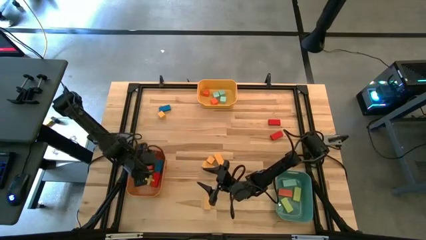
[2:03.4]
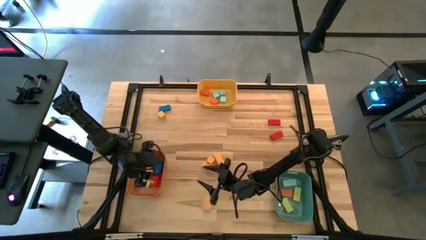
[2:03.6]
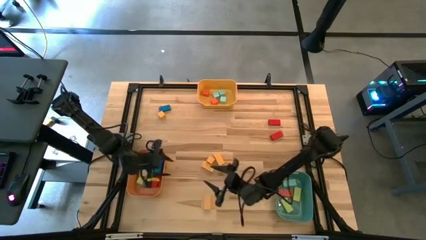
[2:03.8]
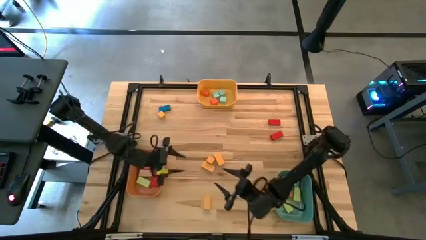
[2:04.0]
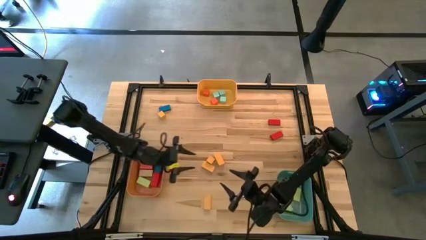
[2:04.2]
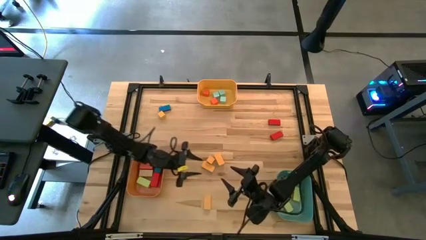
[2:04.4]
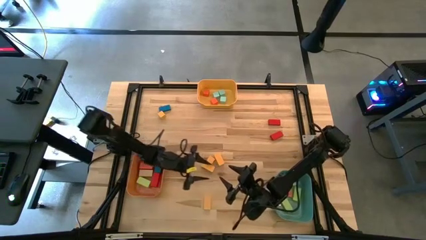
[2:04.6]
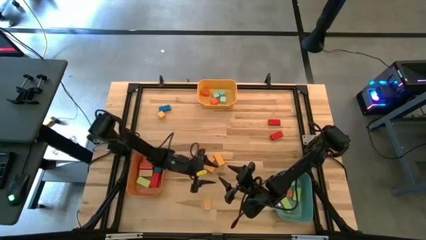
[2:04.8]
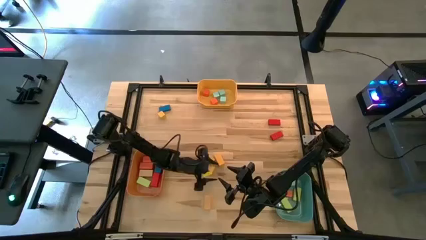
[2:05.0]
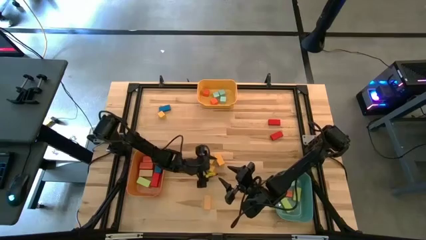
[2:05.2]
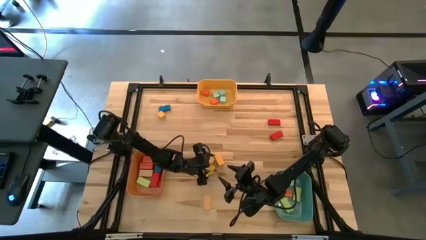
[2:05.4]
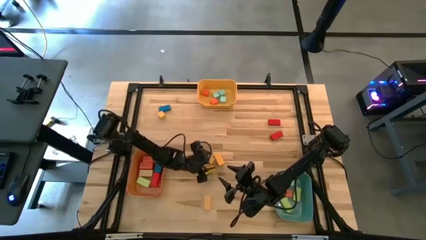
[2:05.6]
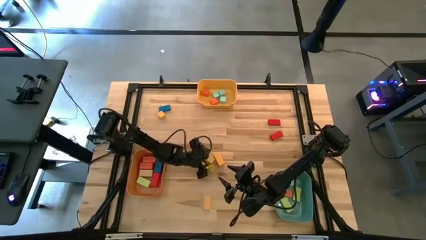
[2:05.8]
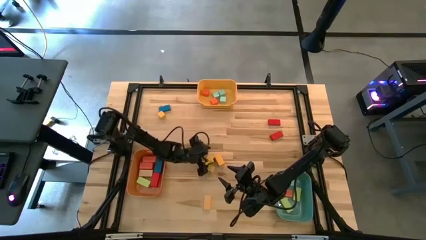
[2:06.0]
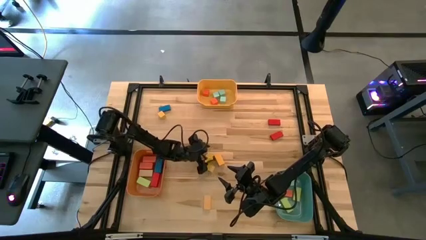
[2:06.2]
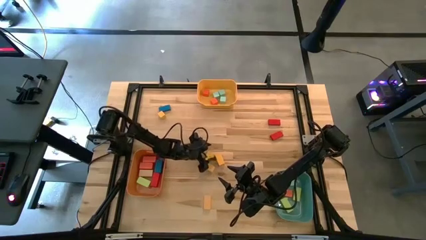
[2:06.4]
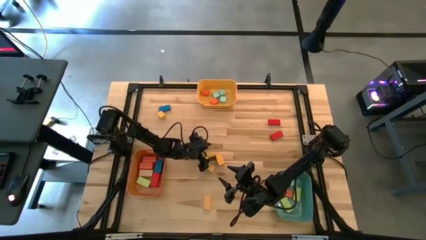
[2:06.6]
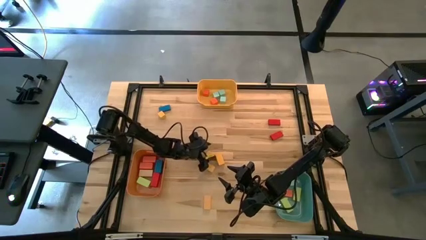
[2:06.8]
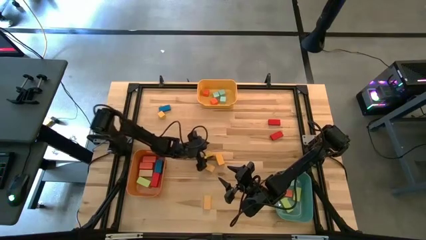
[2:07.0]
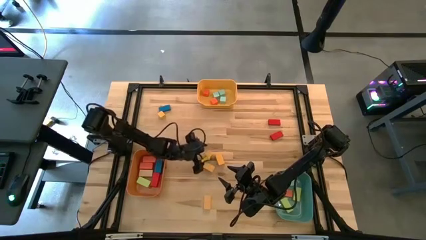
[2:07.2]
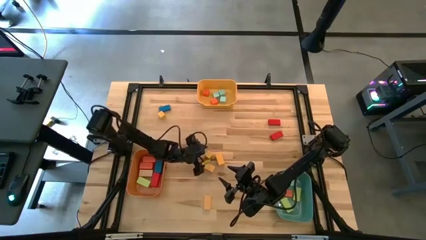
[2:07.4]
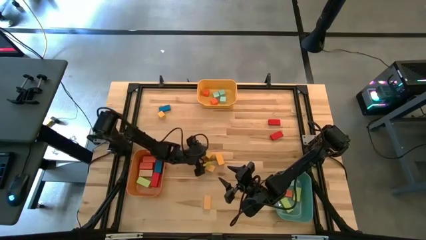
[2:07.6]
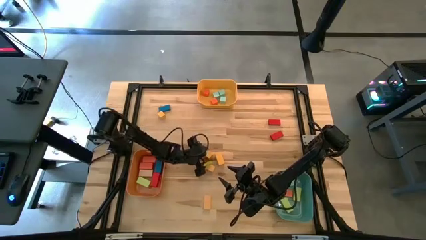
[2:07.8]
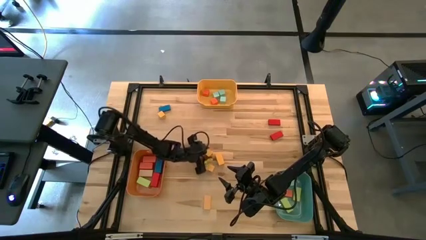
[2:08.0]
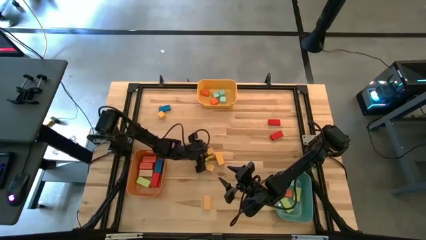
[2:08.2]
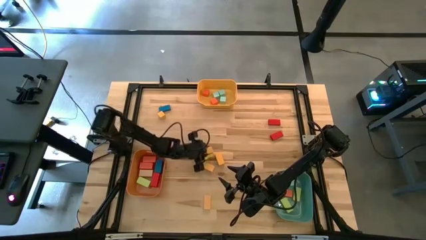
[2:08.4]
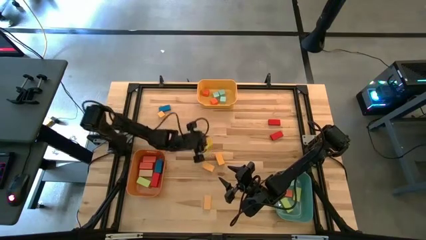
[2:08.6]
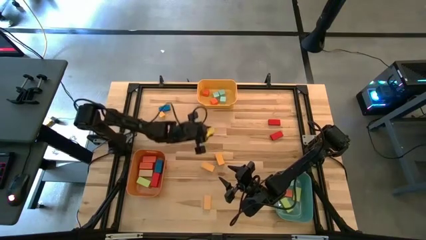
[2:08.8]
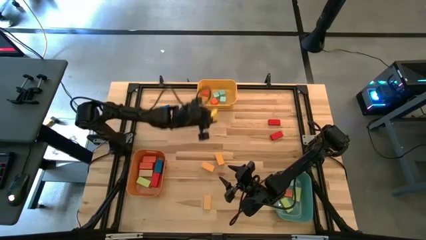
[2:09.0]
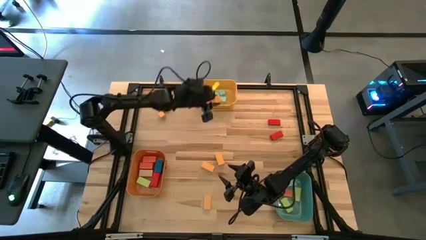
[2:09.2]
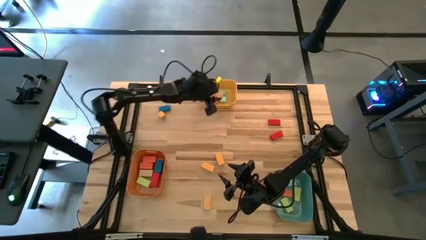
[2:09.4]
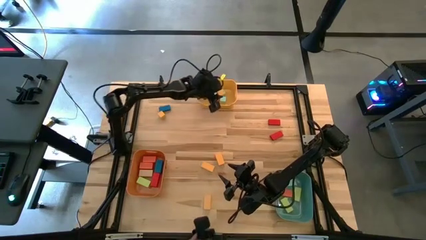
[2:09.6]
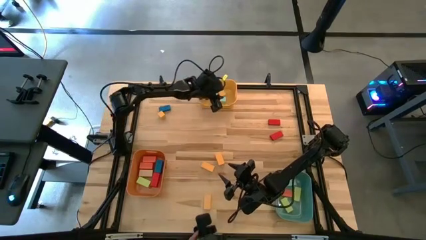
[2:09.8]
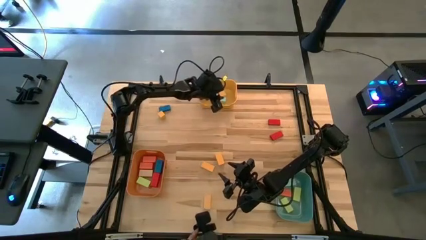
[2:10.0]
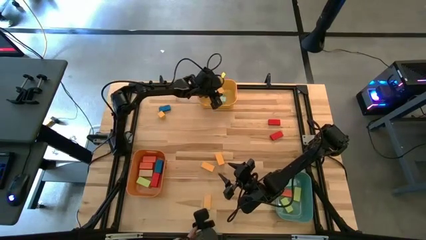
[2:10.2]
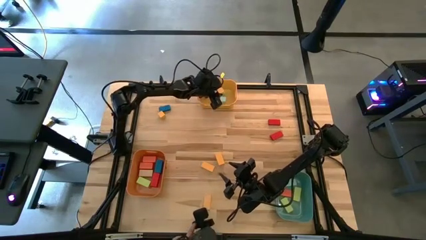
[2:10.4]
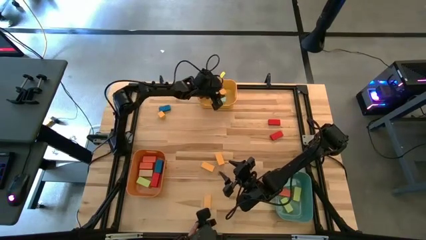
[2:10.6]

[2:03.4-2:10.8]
Task: Sort blocks by size
Put the small yellow block into the yellow bin

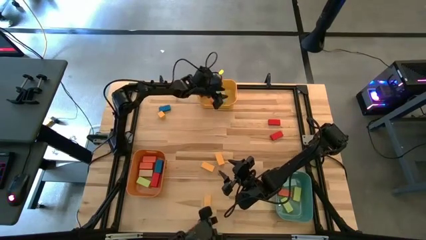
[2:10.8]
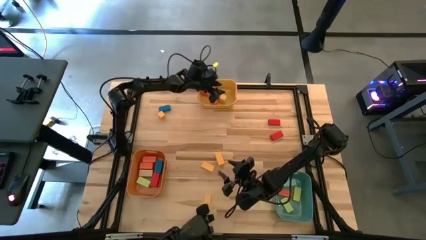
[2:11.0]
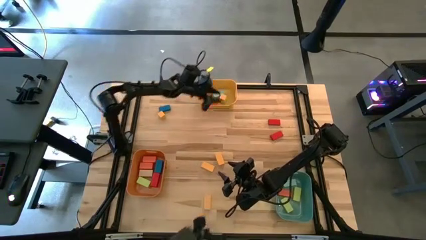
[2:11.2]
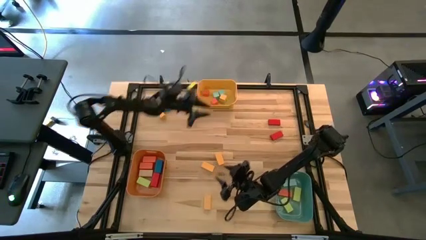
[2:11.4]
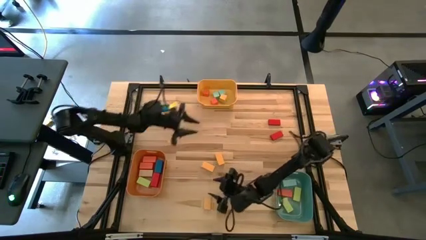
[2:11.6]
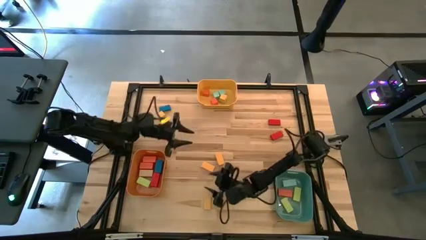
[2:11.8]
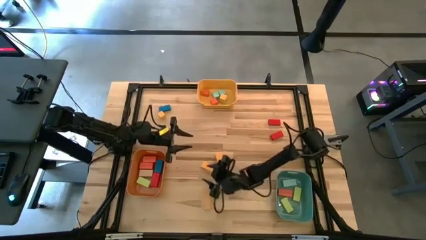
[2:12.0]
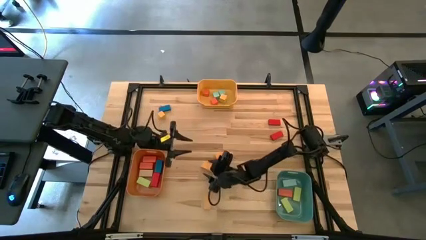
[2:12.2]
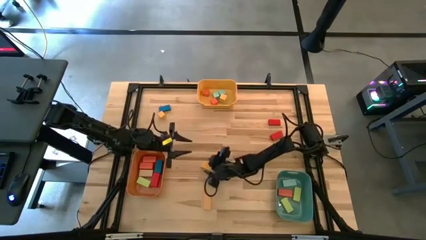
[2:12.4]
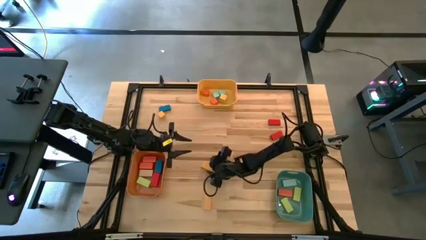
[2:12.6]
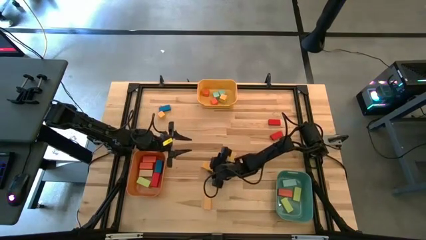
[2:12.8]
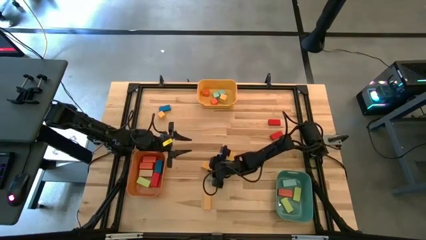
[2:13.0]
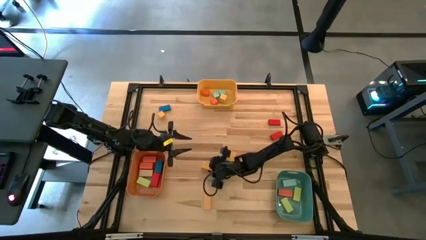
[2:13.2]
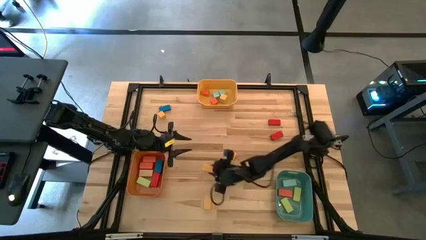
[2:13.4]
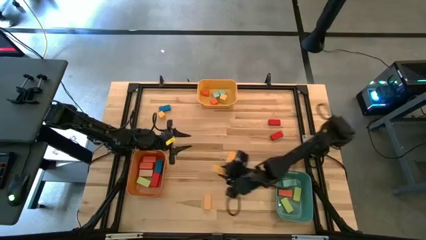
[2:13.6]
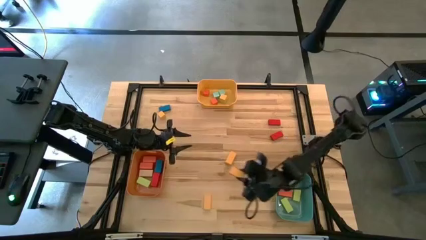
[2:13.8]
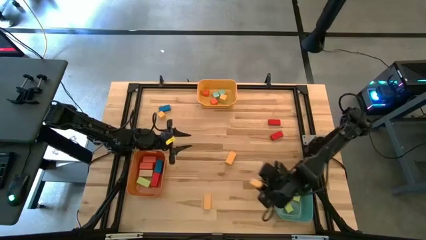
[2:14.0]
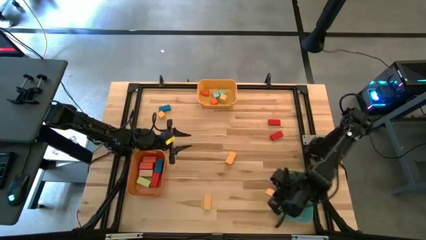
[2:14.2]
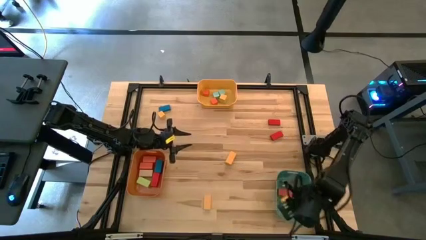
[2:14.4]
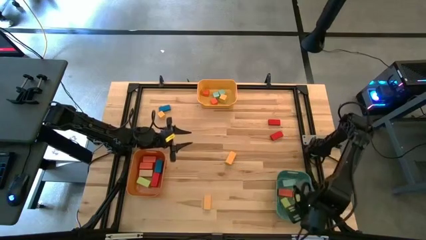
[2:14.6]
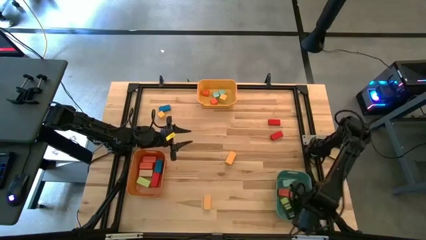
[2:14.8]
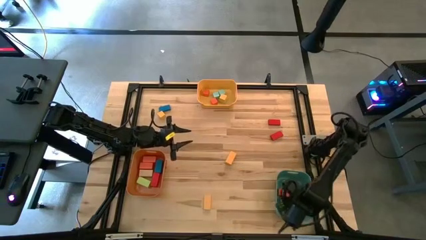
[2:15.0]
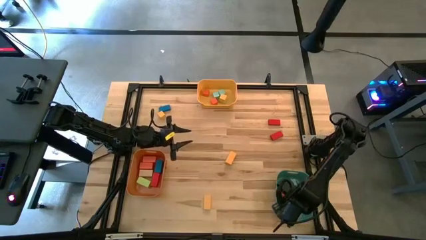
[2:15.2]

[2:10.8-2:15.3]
Put the thin yellow block into the green bin

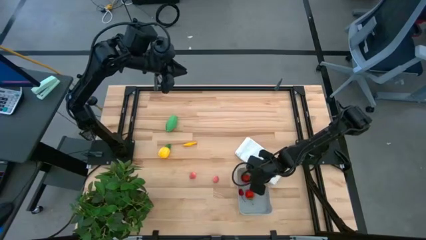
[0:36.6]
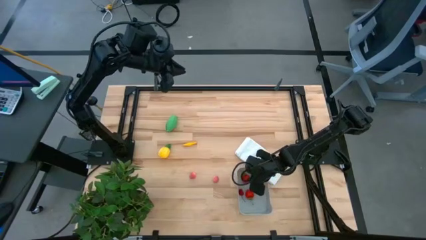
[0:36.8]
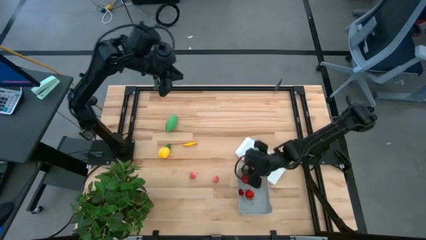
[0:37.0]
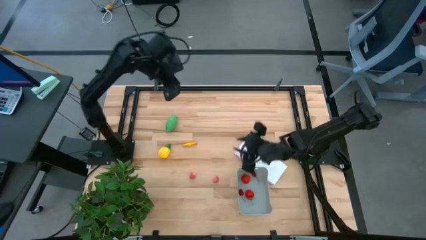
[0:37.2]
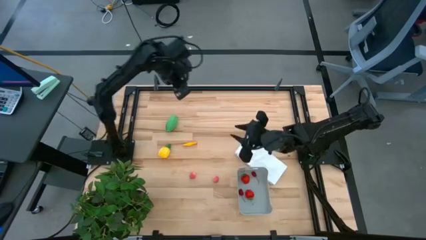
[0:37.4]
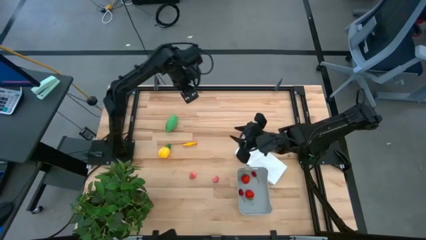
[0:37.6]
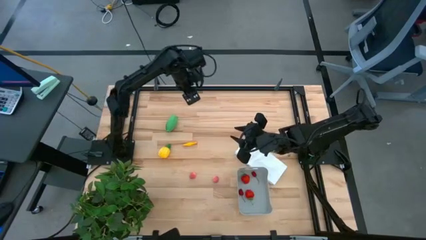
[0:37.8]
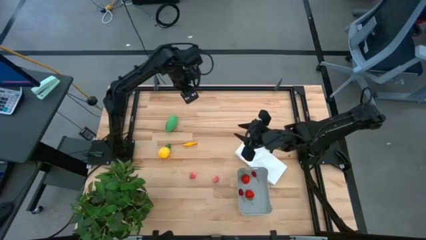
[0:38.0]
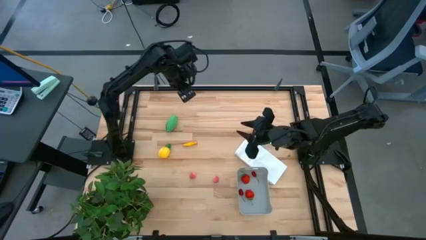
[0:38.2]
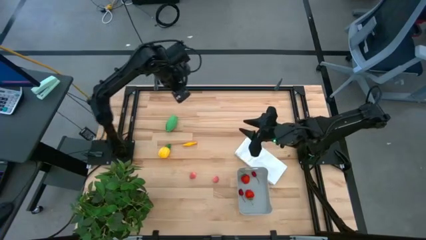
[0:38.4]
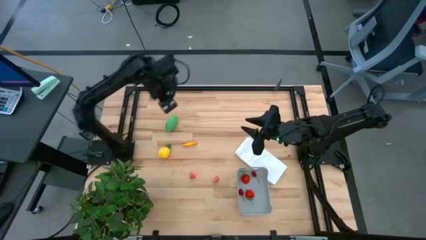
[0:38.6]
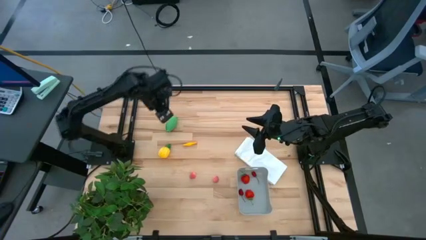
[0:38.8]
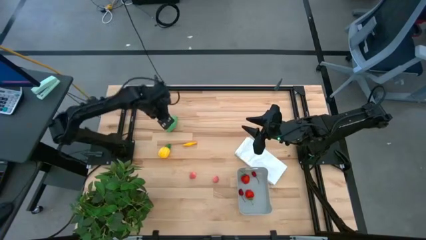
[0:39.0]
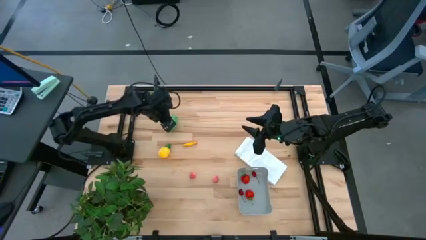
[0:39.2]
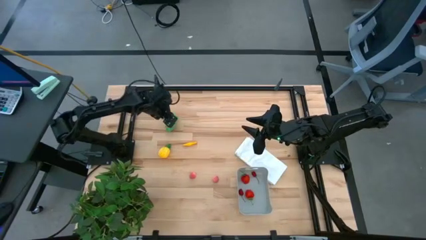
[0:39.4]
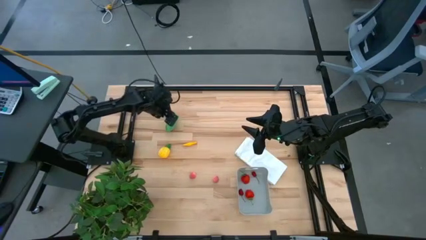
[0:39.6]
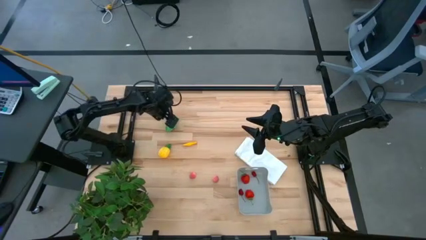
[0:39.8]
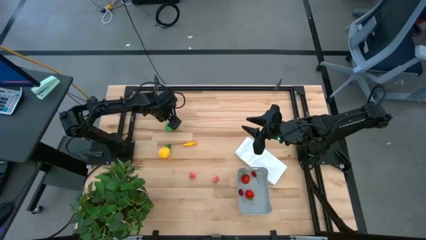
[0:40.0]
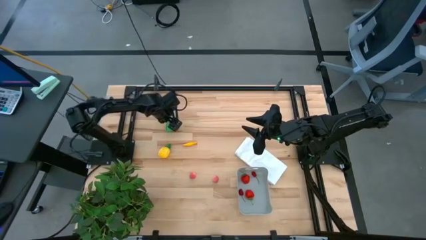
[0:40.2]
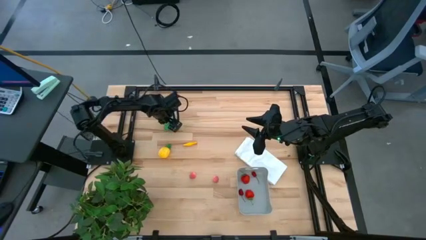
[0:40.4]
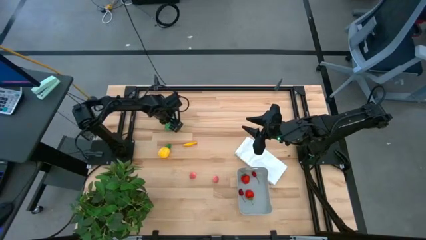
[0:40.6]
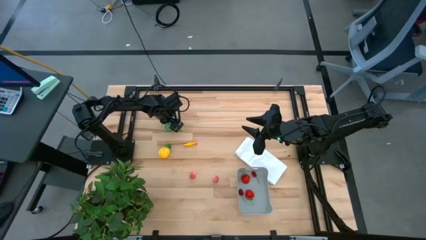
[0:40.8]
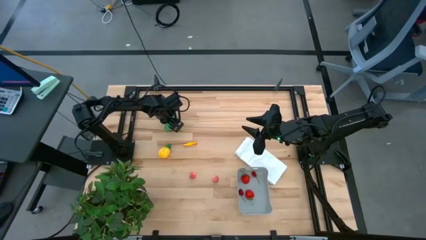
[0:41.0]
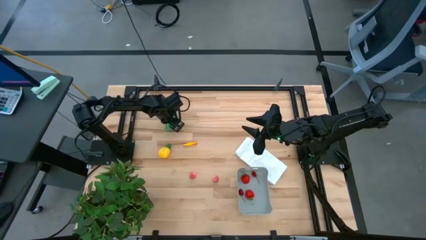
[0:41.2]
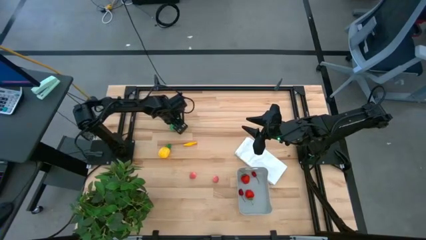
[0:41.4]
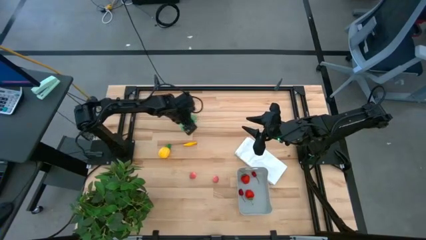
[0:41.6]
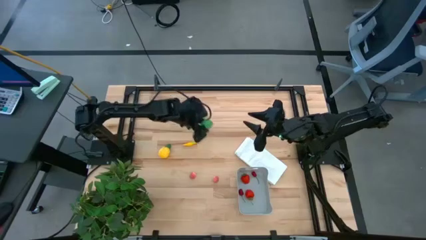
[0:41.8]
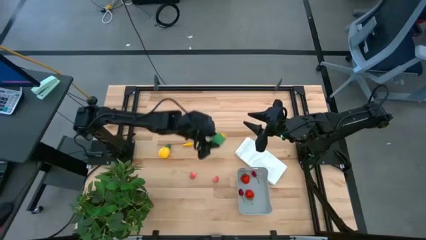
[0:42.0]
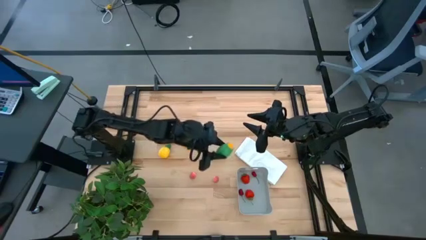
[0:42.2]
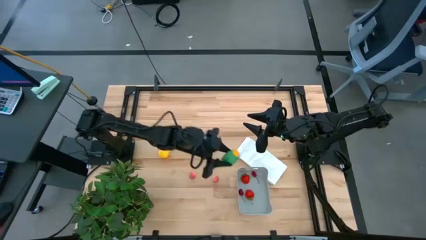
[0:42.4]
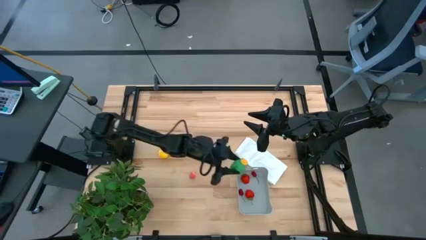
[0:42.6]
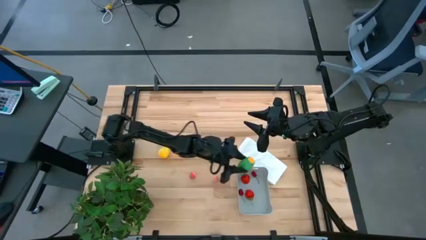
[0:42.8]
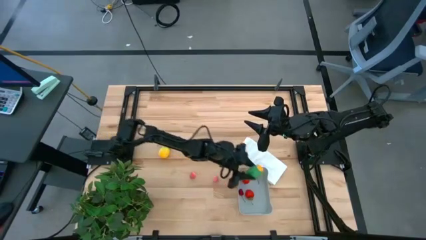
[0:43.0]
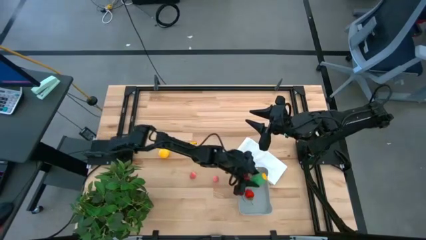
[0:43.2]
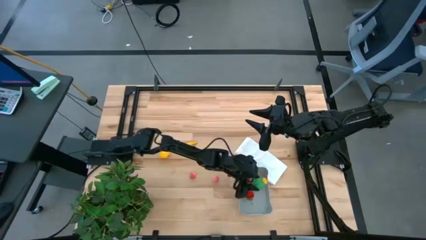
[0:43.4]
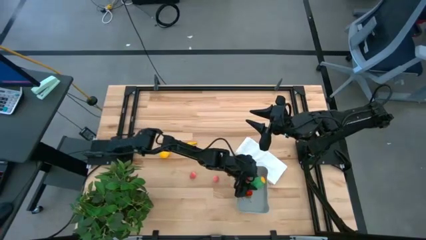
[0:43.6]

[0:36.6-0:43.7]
Task: Pick and placing Produce into tupperware
Put the green corn into the gray bin
